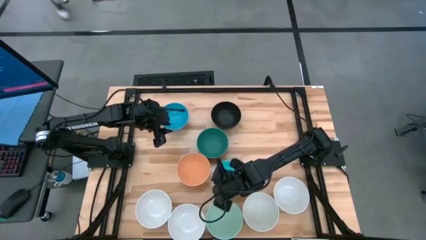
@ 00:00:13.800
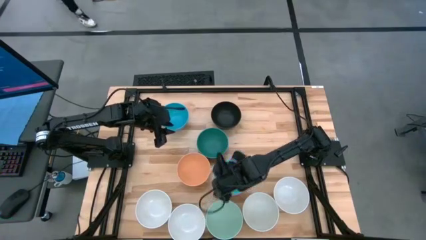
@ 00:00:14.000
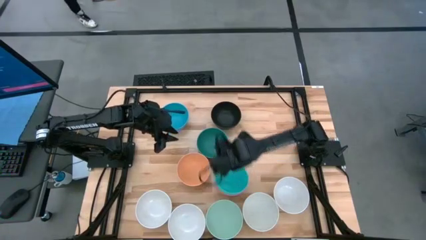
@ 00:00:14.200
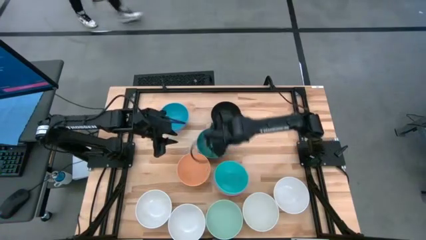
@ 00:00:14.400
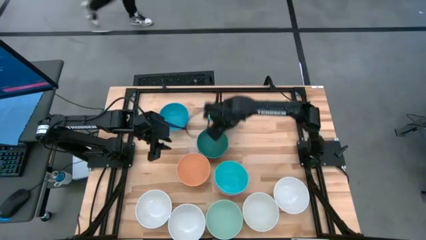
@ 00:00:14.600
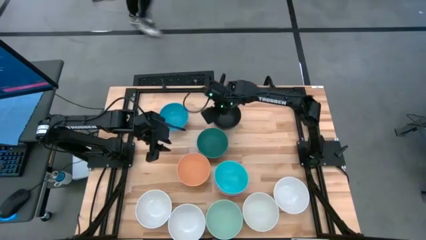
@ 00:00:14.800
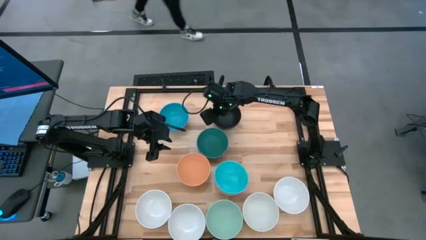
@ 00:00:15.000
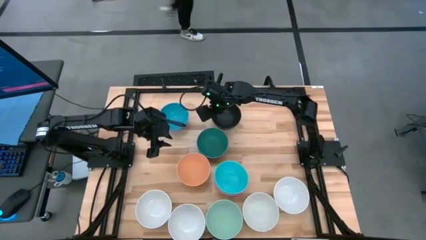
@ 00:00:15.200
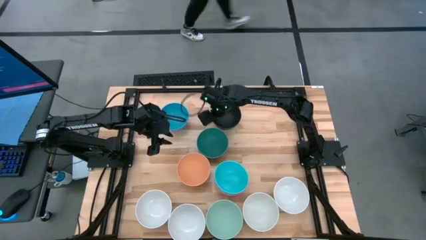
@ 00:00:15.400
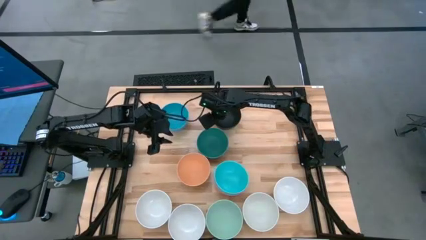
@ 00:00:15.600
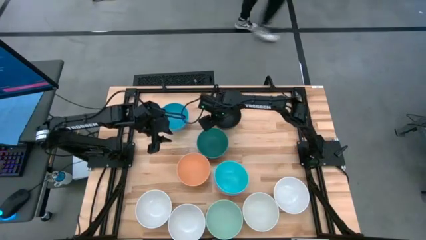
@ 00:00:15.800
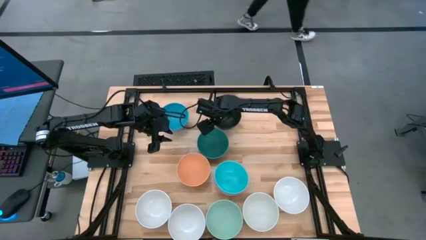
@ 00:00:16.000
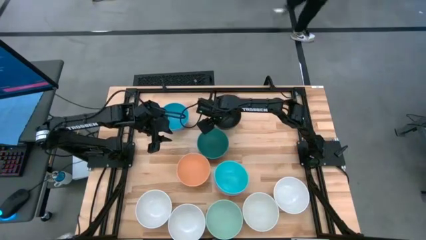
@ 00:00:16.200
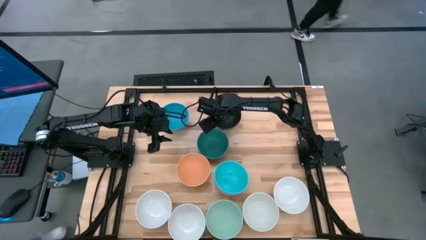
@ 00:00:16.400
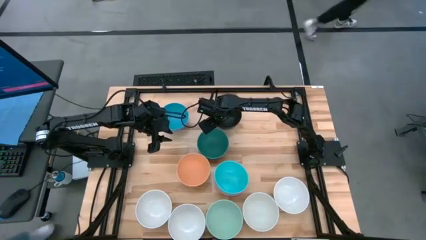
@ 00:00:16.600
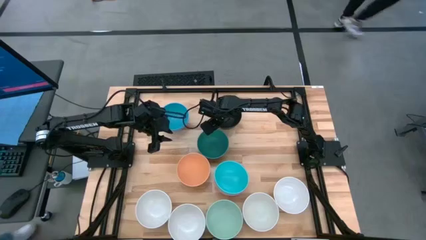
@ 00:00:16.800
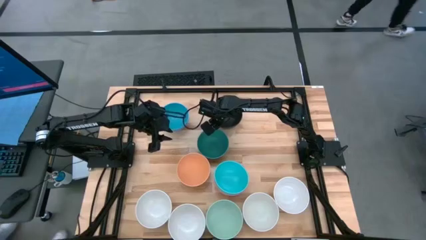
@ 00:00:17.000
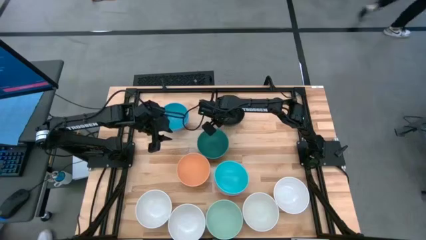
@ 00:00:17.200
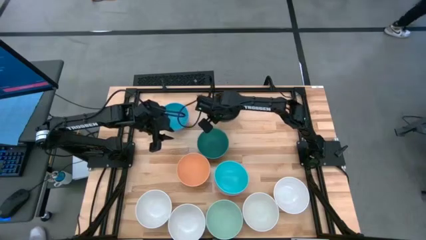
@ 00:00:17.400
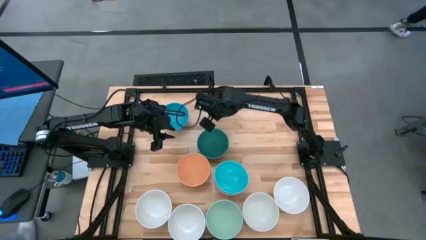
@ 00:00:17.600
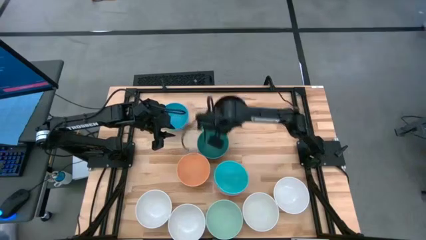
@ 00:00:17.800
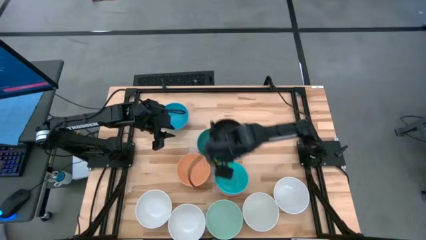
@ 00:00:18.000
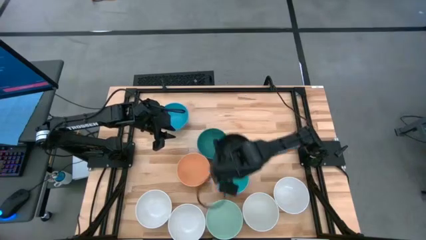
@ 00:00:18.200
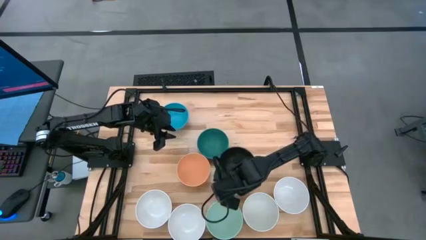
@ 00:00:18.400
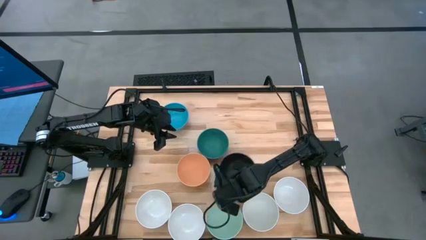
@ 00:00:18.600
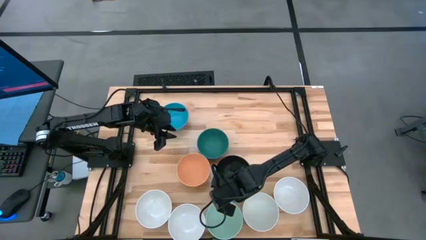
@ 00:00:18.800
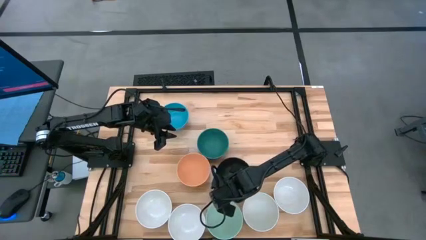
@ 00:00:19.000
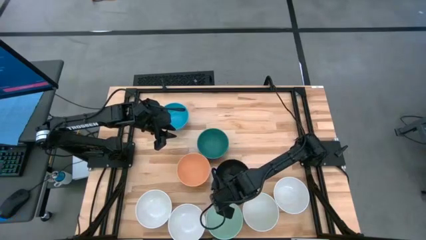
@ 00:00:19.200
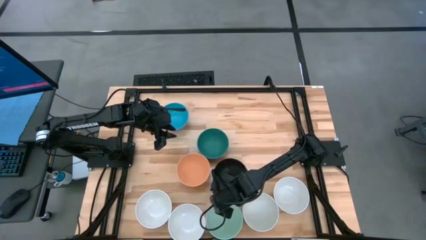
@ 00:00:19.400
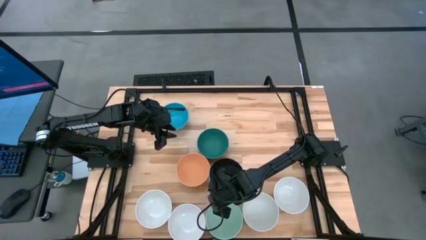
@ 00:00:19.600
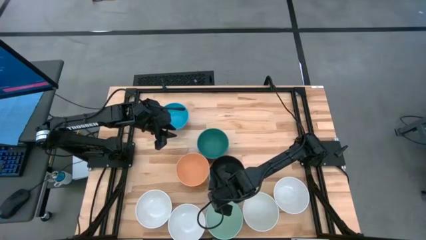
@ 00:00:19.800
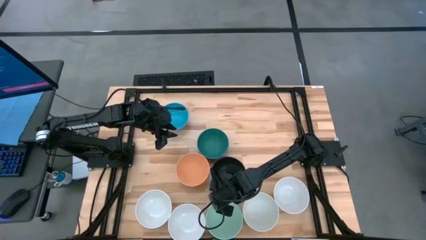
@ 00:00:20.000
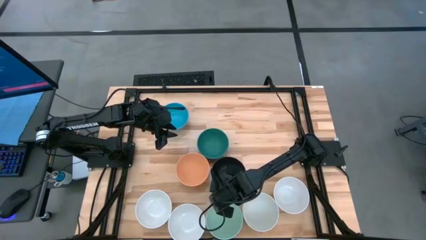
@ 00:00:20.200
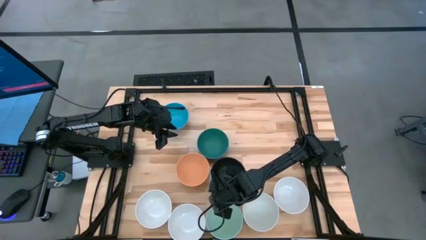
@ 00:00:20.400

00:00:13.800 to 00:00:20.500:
Task: Nest bowls inside each other
Stack the black bowl on the light blue bowl

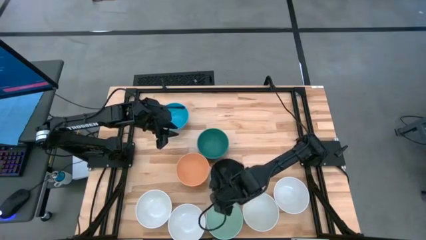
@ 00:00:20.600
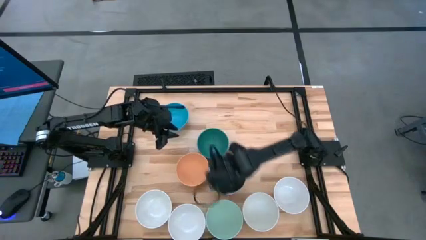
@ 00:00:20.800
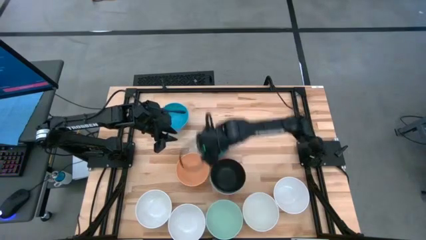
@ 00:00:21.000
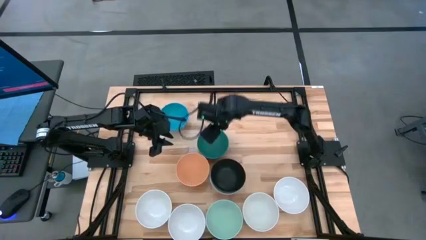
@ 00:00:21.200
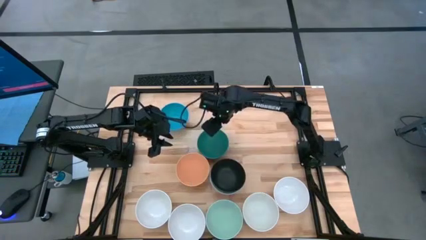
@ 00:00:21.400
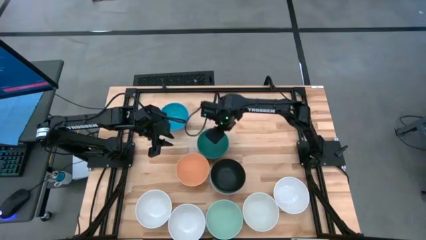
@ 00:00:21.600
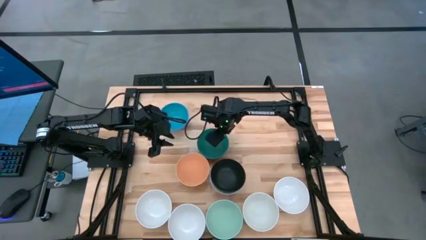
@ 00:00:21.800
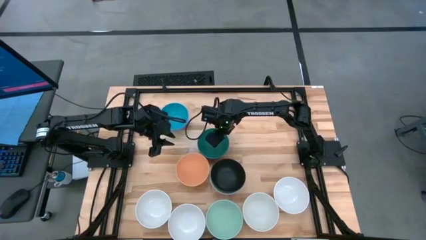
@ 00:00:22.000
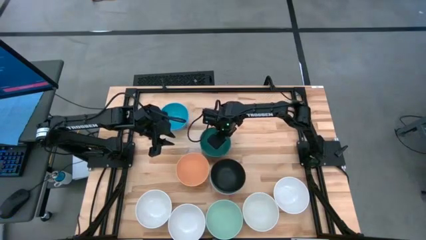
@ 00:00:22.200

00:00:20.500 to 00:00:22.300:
Stack the green bowl on the black bowl

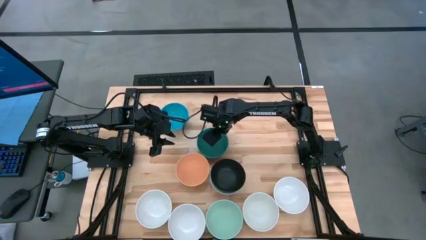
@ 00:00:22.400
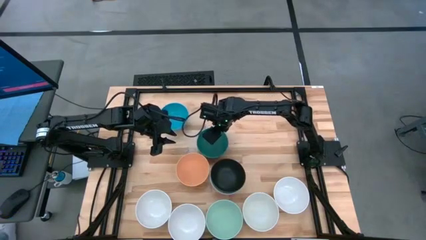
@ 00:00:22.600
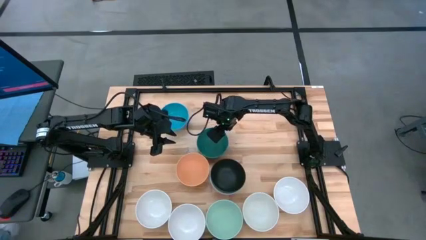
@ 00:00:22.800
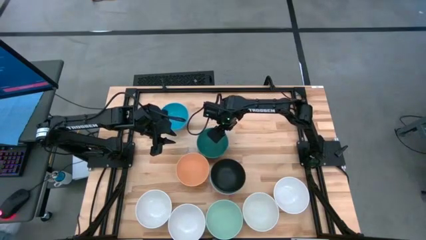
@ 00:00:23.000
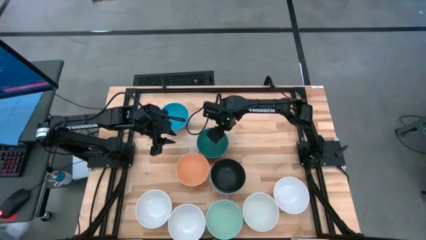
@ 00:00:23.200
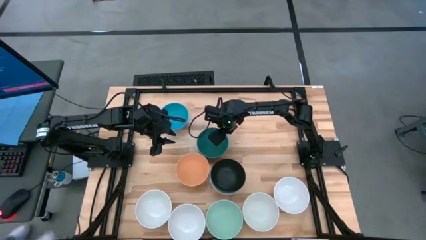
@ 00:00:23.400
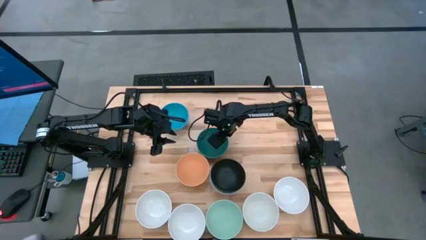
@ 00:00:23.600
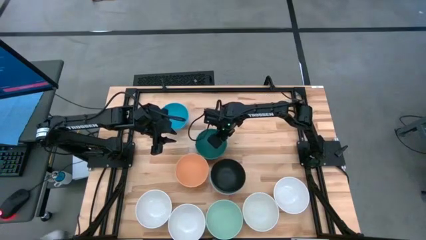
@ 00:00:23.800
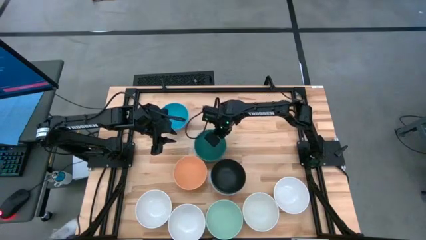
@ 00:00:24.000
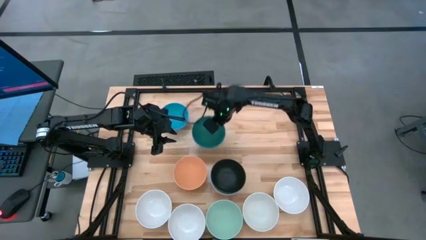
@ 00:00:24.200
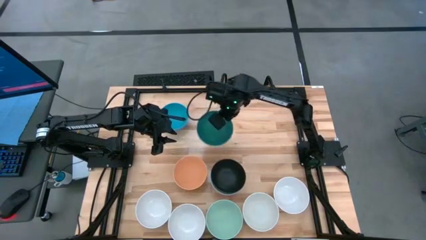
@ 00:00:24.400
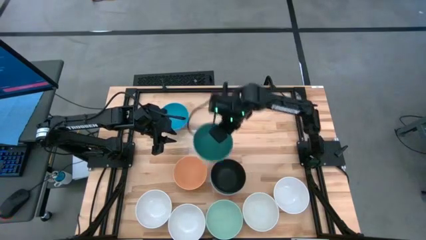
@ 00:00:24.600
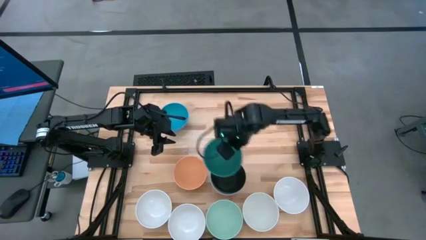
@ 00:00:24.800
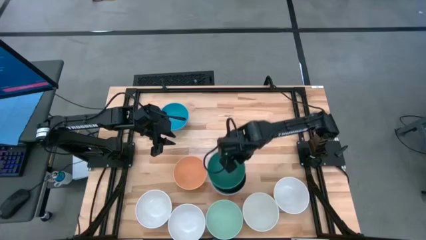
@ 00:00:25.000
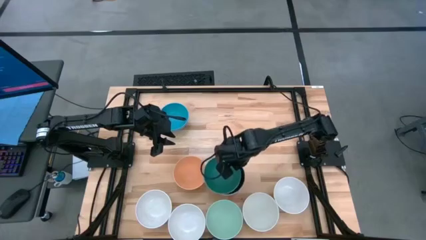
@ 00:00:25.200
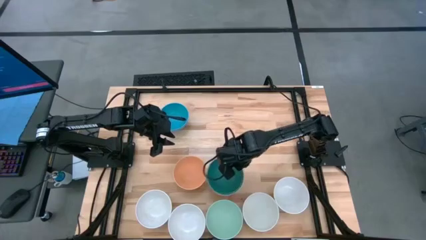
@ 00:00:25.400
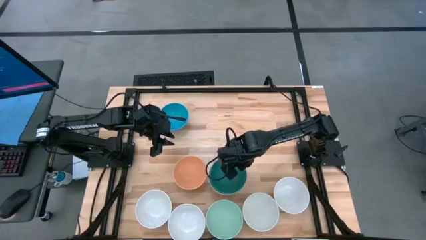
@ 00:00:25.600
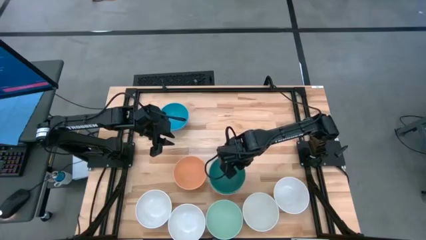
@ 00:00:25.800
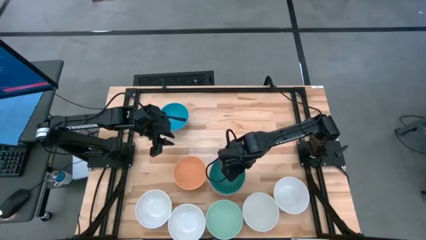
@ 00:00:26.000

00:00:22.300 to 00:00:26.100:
Stack the green bowl on the black bowl

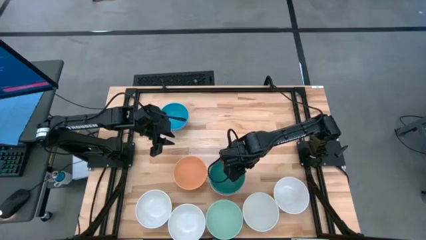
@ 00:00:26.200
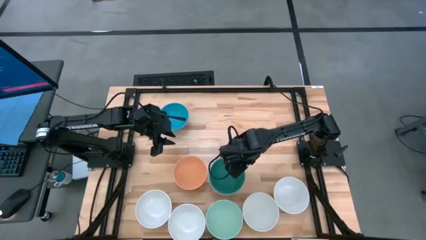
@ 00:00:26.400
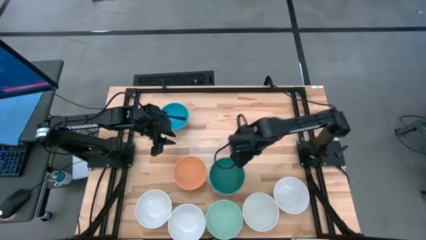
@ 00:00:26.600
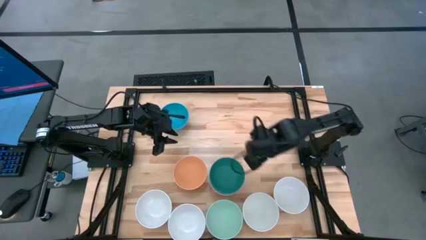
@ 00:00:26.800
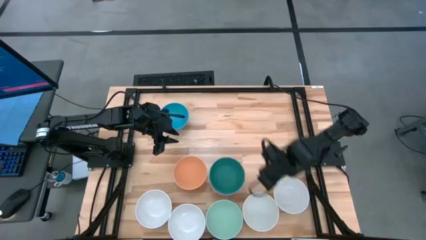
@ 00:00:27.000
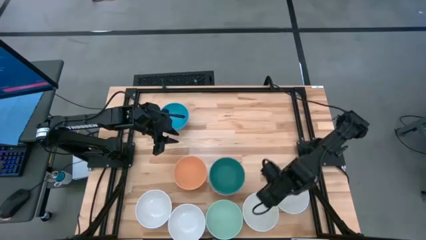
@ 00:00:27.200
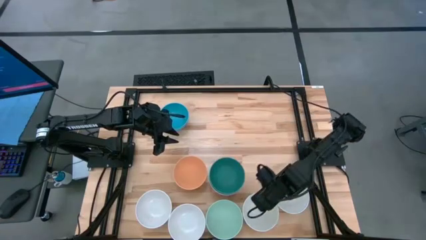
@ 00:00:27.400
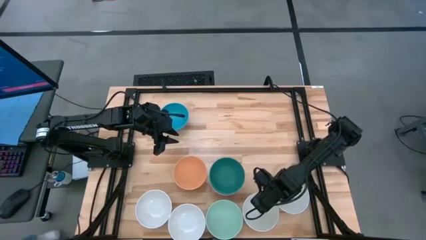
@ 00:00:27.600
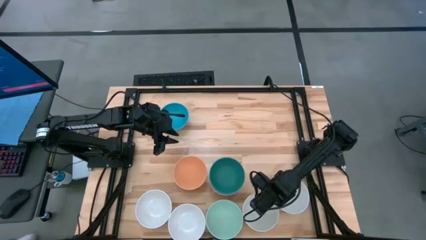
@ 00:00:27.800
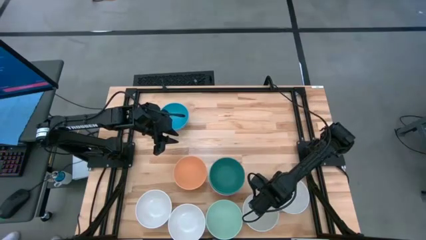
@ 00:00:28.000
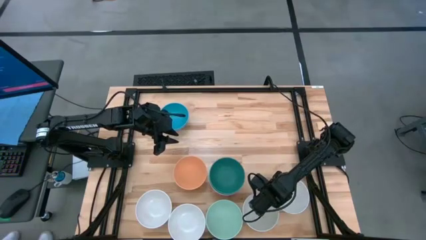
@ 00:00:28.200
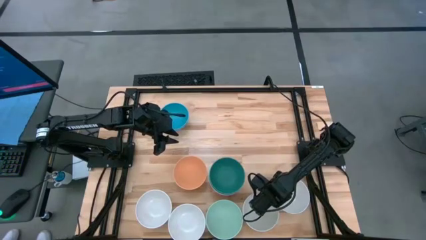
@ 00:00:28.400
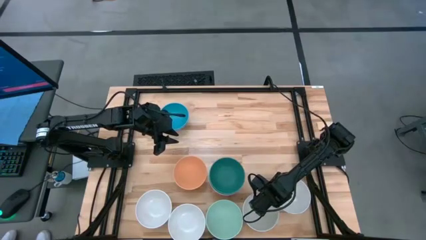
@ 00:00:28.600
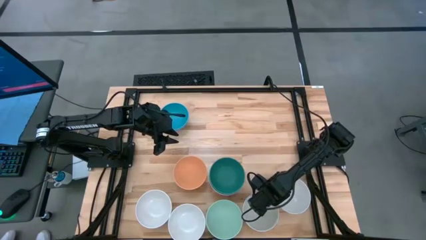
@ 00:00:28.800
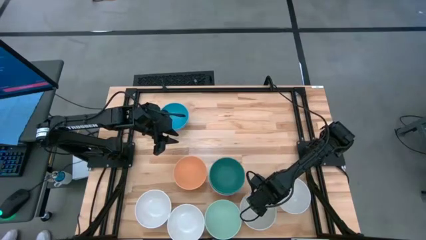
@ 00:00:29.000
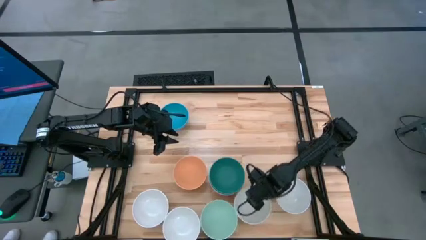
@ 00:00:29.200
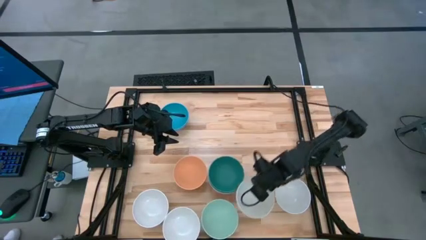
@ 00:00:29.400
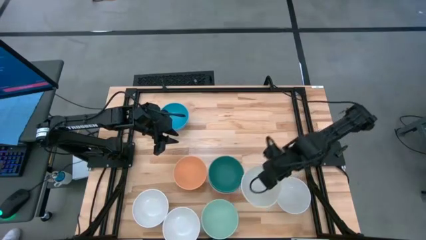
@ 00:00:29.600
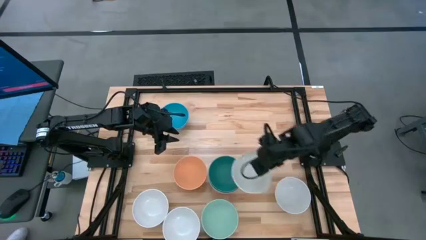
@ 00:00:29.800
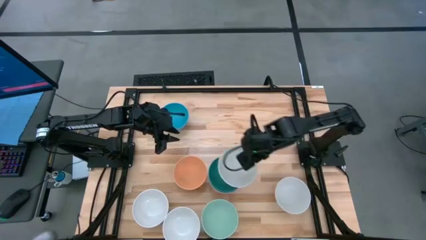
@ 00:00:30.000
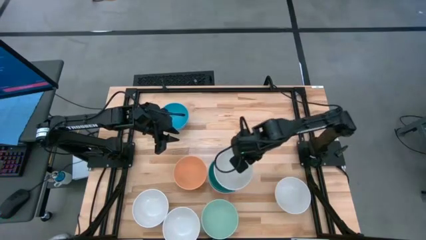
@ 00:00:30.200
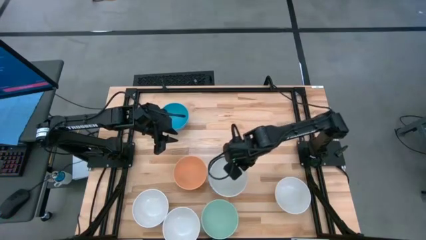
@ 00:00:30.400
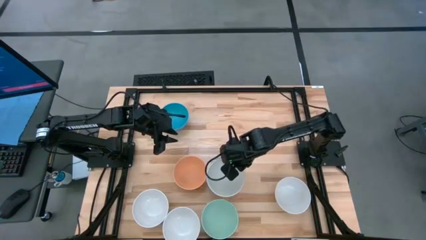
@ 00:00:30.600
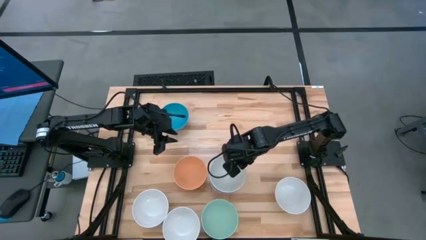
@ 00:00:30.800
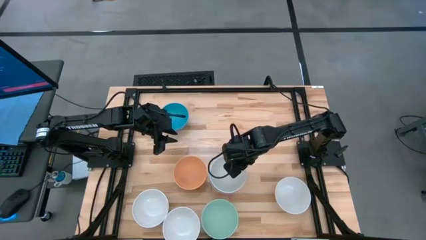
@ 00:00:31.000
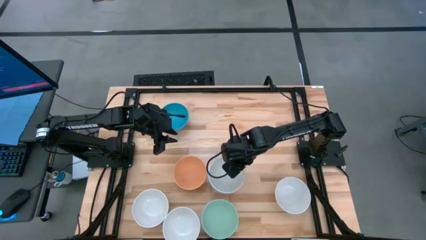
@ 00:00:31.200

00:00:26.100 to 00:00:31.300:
Stack the white bowl on the green bowl

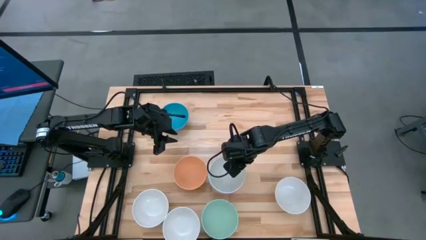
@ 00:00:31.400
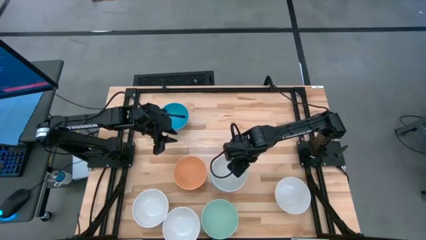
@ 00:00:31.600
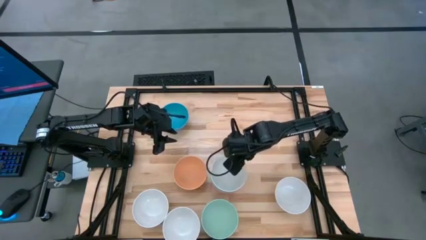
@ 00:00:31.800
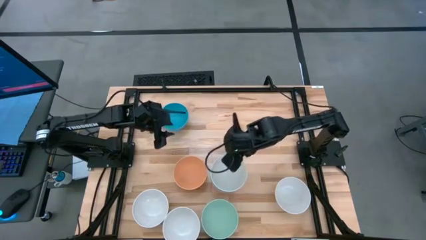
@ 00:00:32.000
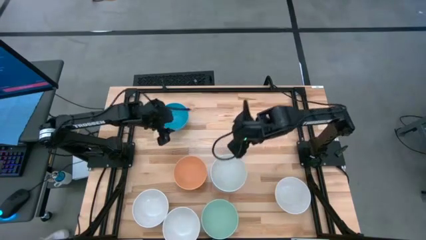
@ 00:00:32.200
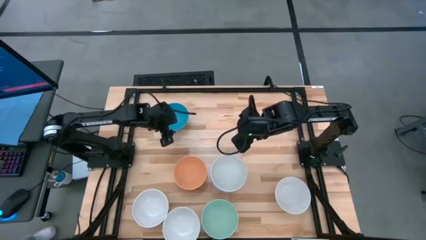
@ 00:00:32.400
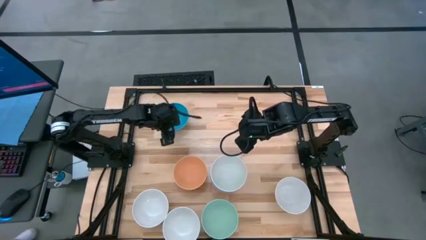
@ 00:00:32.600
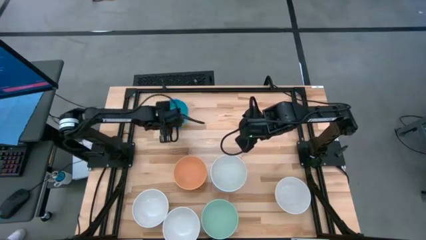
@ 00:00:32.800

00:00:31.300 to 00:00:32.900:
Stack the blue bowl on the white bowl
